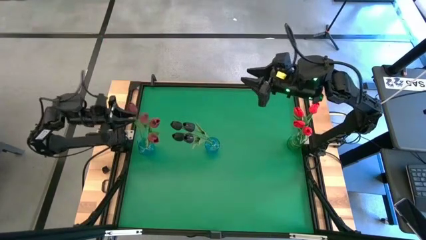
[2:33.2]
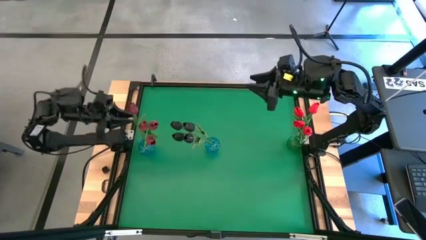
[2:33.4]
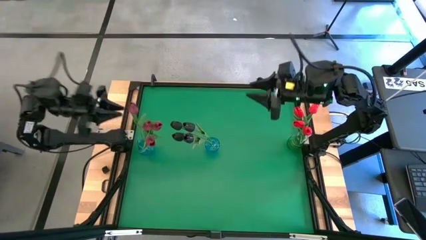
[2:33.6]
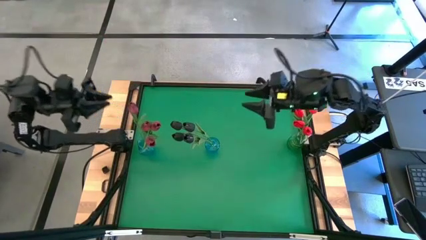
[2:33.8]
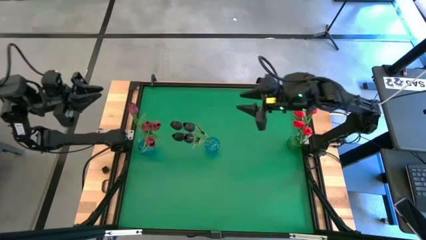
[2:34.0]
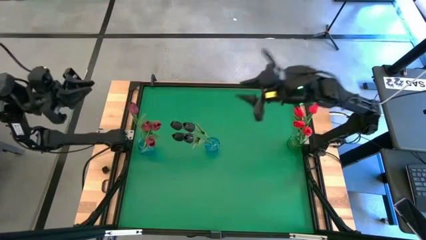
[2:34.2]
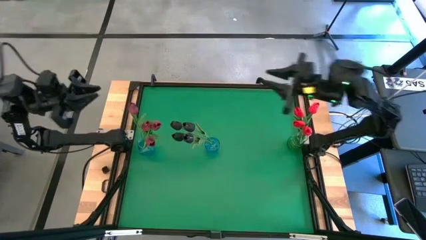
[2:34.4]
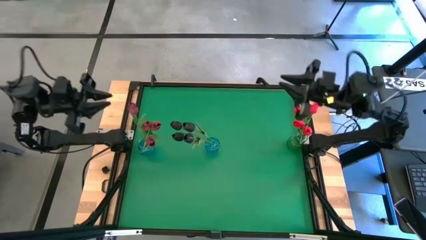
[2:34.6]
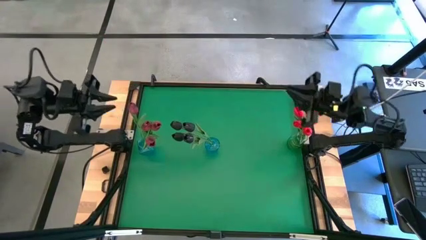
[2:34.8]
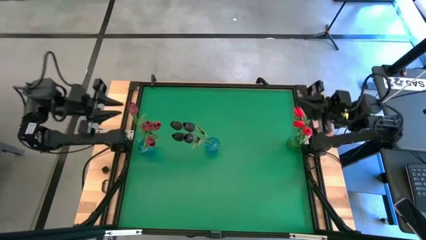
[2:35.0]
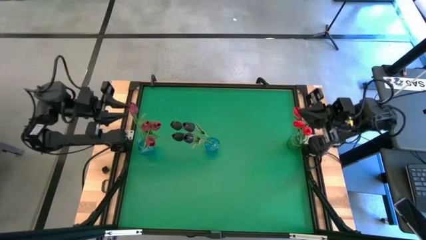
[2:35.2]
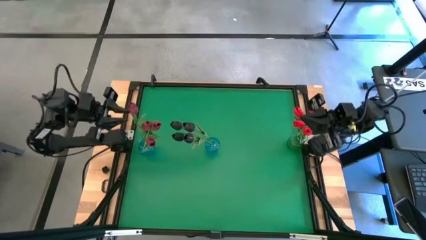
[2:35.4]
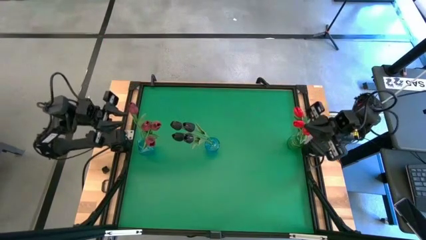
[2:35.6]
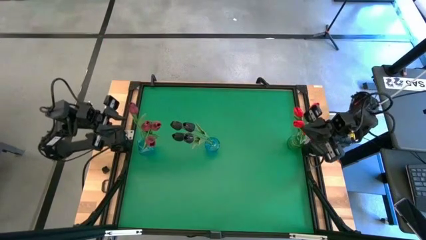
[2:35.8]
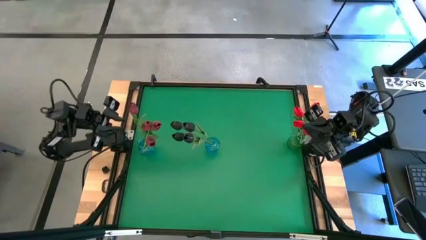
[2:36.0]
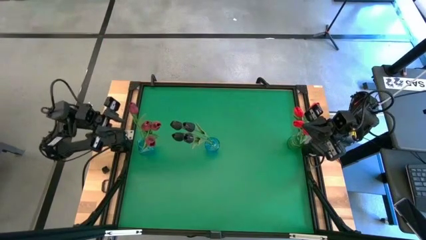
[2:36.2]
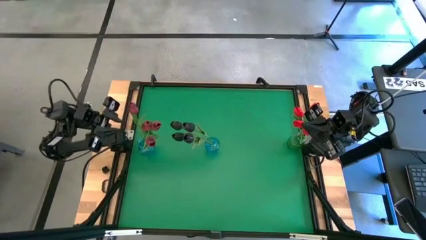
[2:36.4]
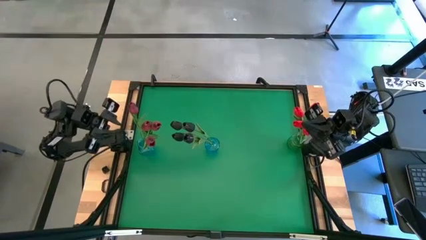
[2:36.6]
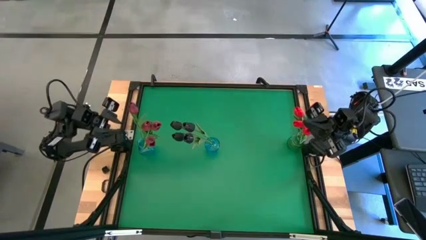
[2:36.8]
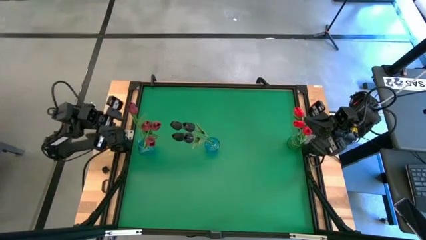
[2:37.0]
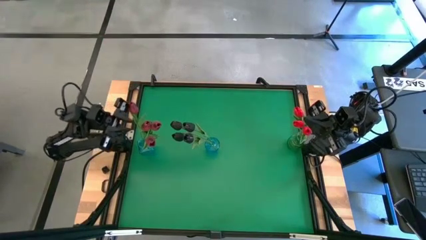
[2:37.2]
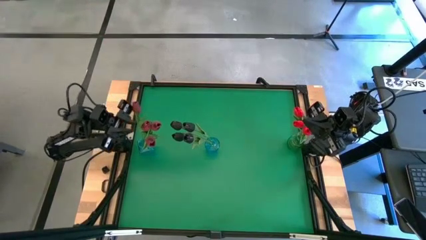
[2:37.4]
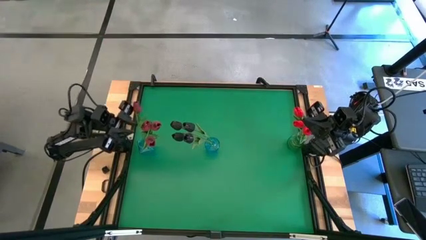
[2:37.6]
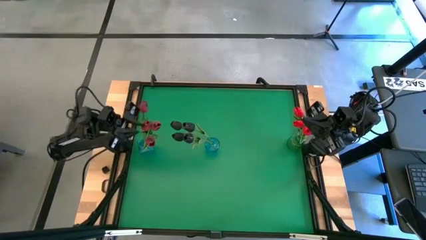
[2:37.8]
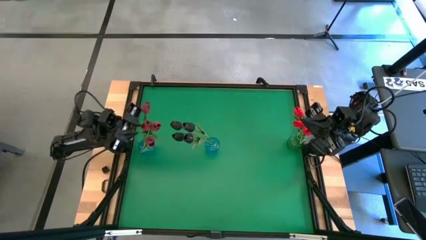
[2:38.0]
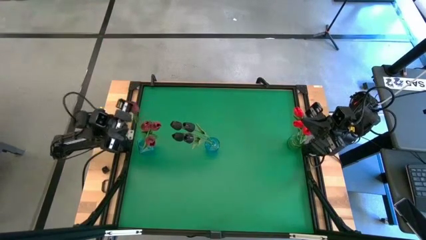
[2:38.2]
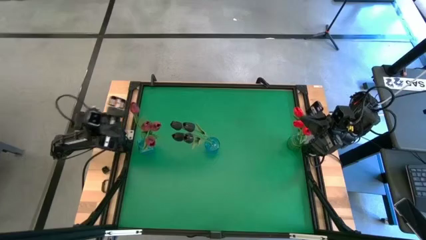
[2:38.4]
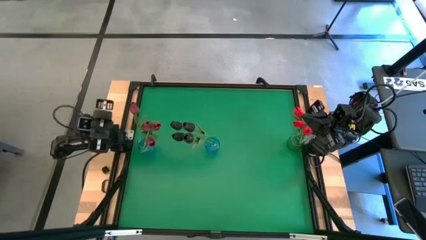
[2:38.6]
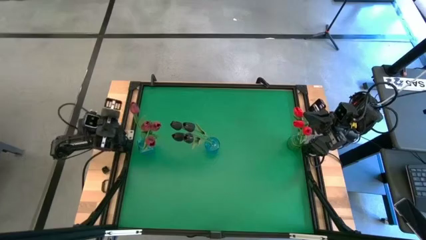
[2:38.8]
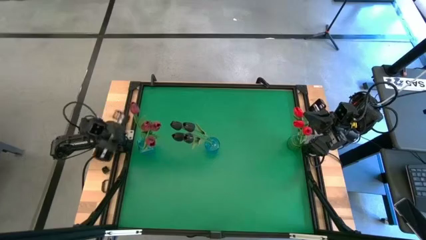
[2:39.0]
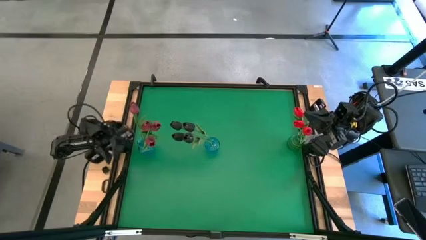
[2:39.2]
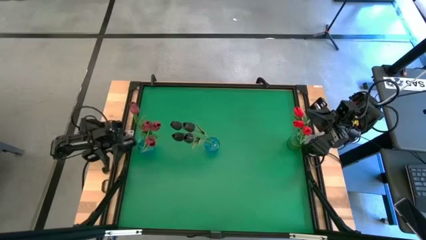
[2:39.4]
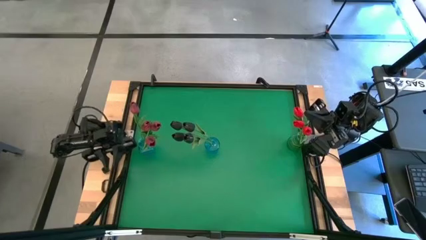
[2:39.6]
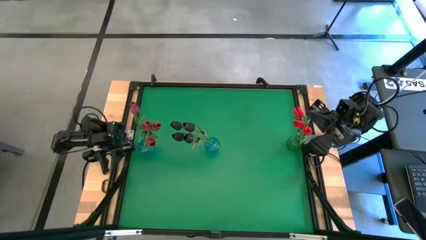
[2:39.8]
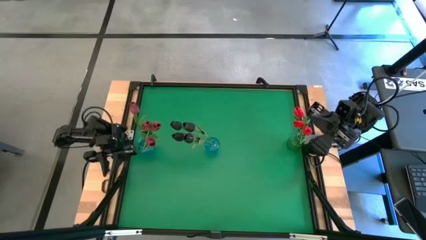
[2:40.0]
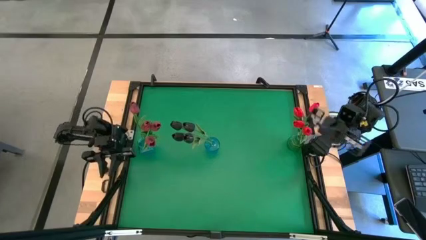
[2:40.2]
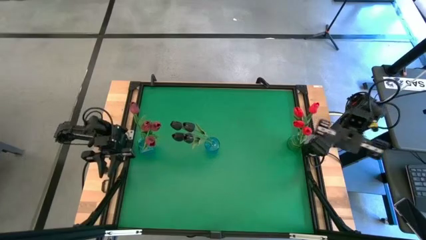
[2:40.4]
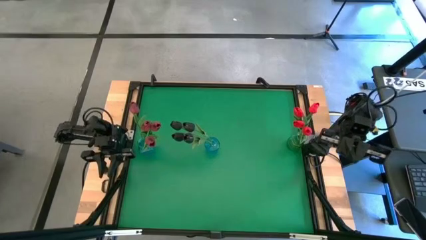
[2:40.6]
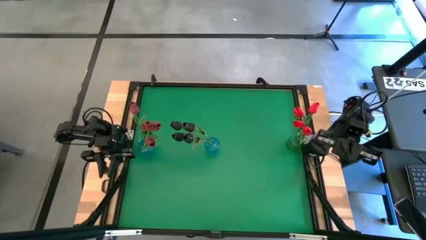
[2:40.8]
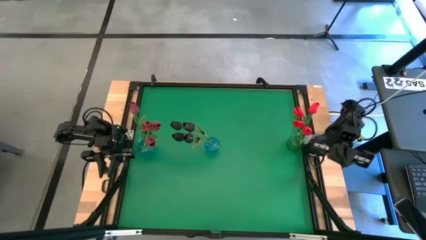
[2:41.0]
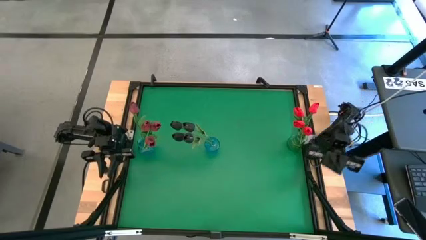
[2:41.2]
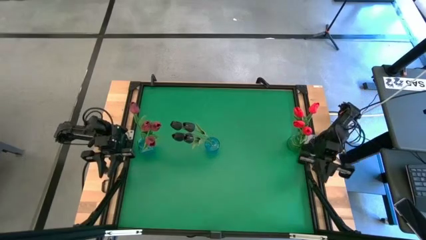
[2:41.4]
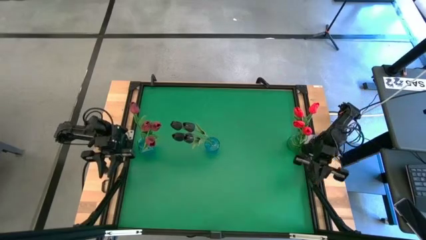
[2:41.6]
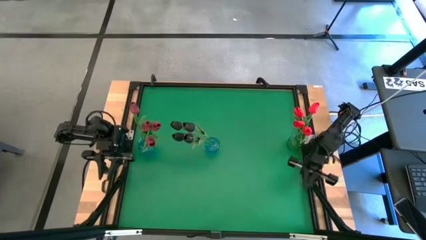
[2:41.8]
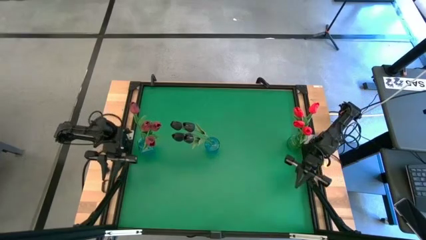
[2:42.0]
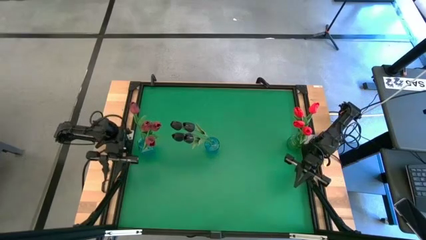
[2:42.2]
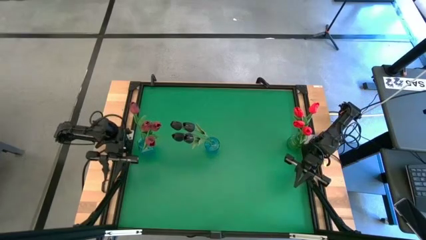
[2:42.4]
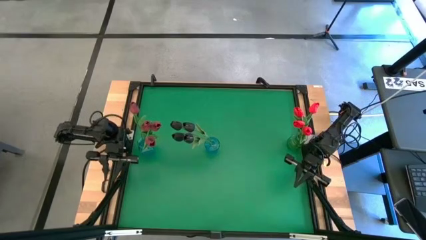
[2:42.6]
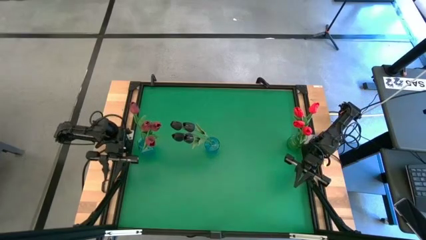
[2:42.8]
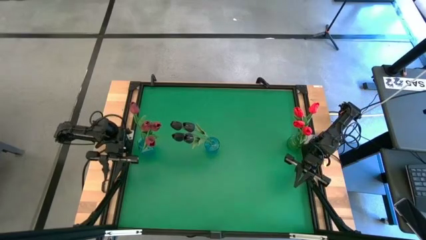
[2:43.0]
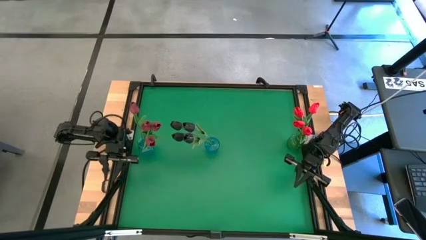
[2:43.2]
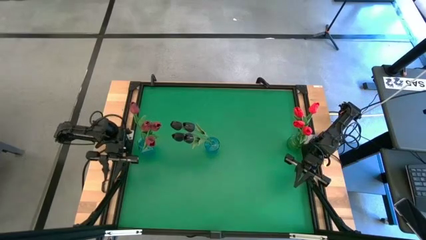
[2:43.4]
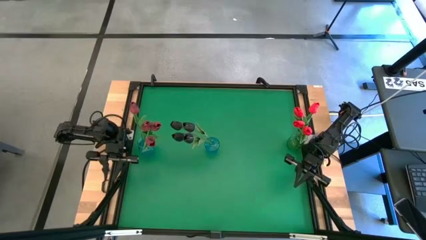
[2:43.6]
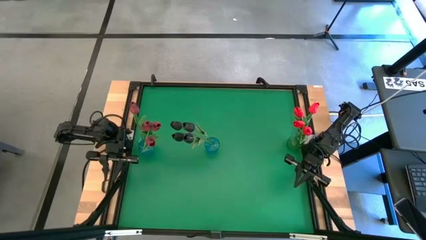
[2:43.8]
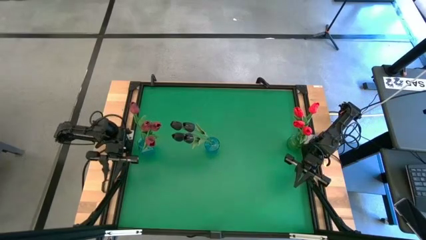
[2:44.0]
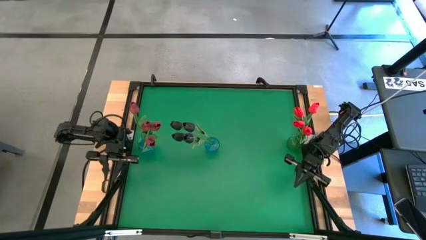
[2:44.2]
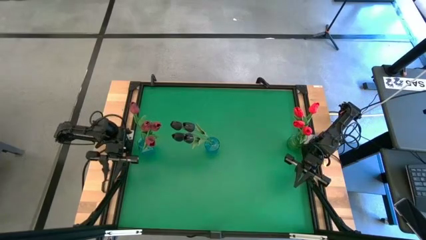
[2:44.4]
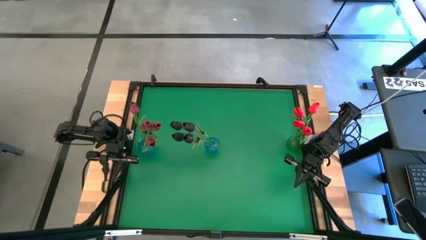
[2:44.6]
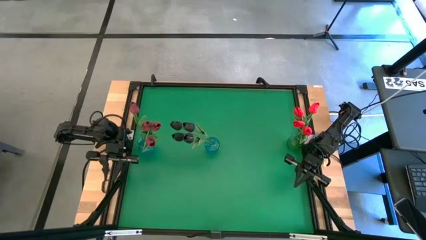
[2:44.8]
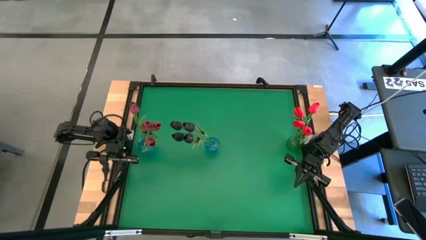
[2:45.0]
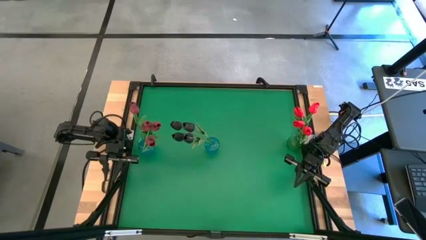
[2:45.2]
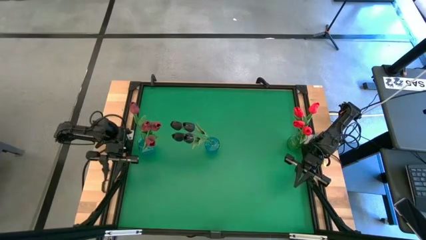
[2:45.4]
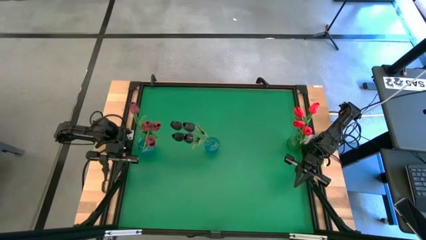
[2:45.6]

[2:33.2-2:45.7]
Task: Sort flowers into vase by color
Return to Home Position

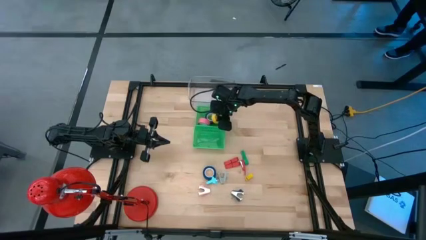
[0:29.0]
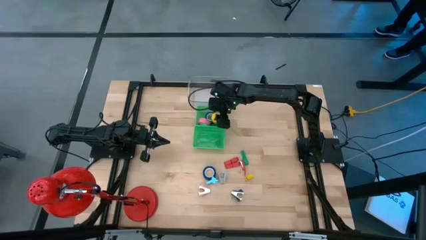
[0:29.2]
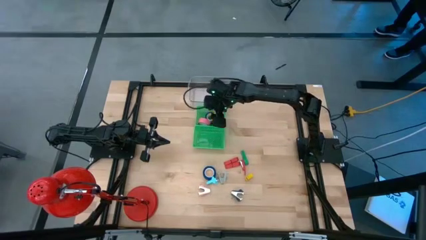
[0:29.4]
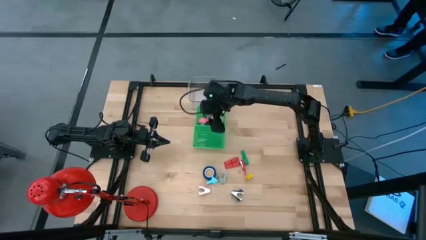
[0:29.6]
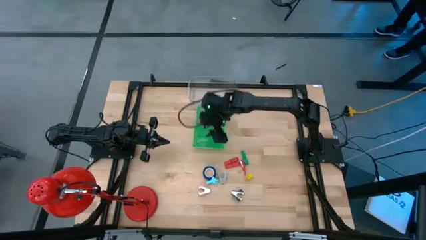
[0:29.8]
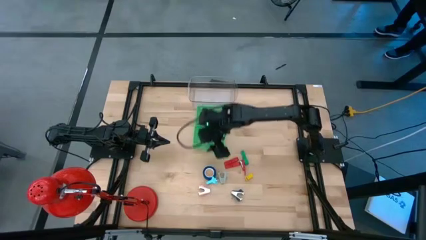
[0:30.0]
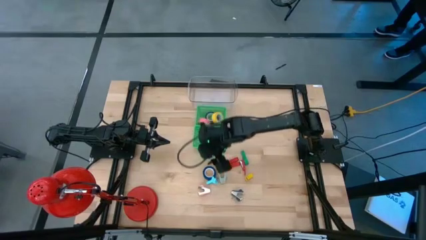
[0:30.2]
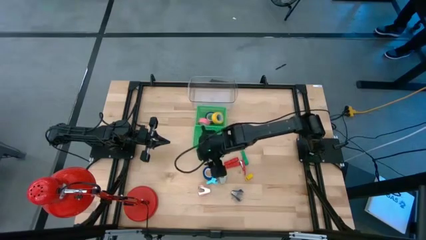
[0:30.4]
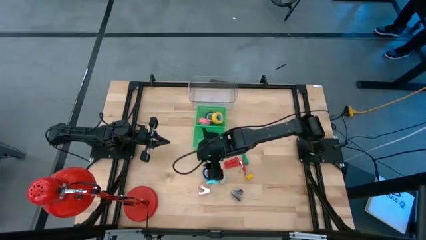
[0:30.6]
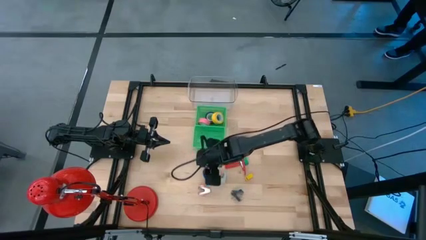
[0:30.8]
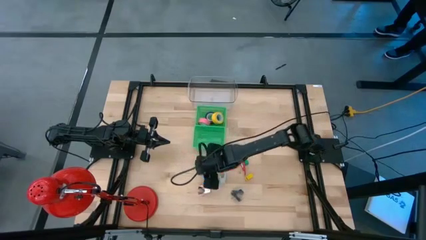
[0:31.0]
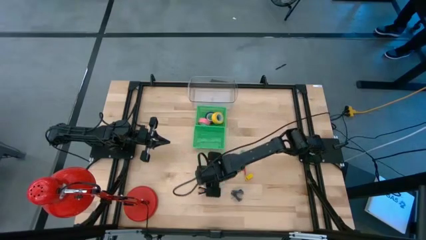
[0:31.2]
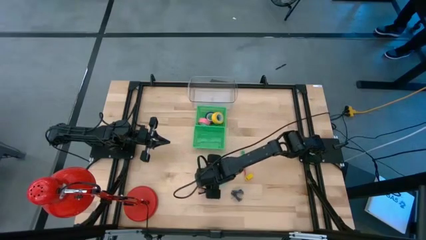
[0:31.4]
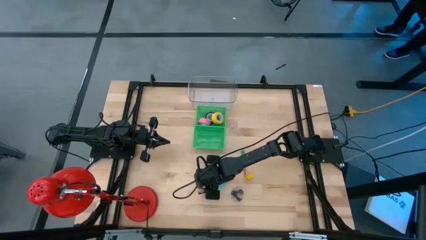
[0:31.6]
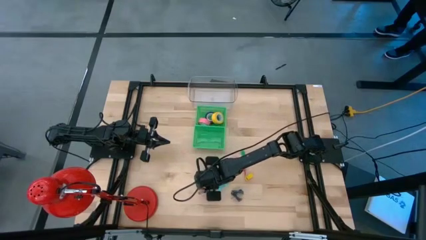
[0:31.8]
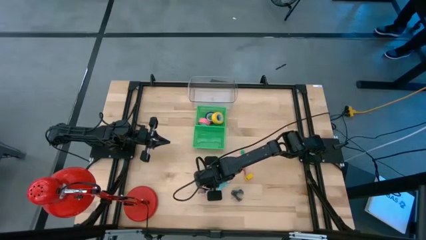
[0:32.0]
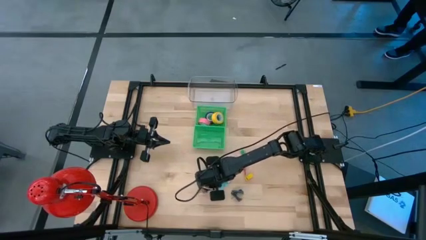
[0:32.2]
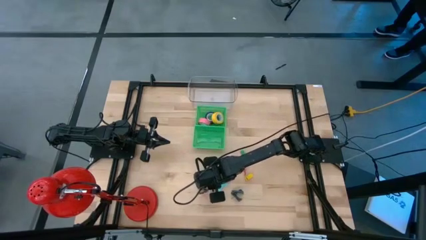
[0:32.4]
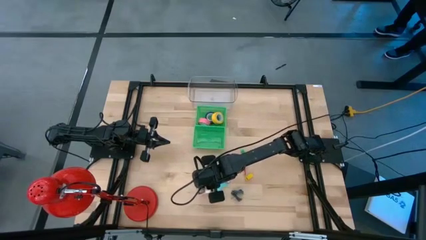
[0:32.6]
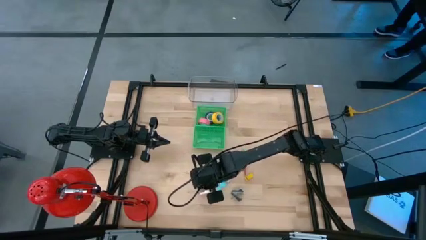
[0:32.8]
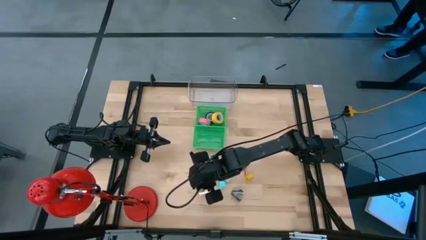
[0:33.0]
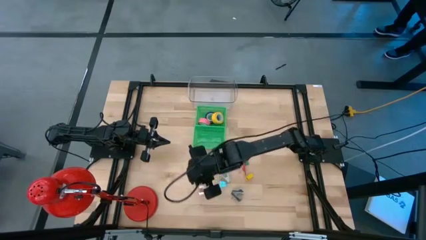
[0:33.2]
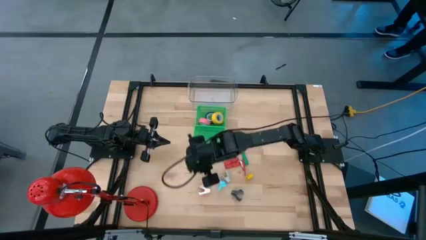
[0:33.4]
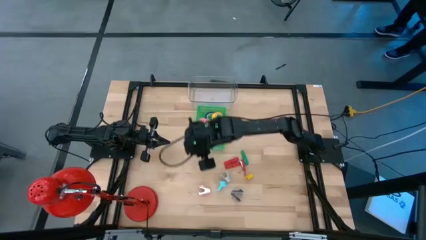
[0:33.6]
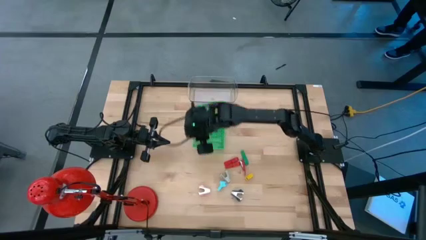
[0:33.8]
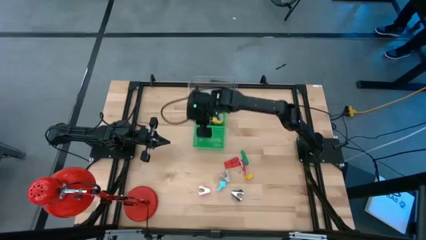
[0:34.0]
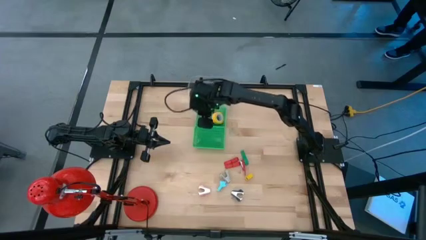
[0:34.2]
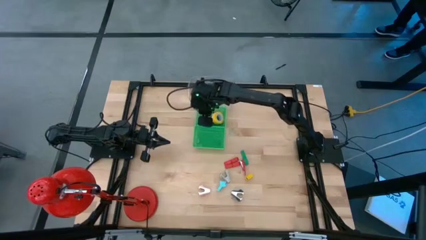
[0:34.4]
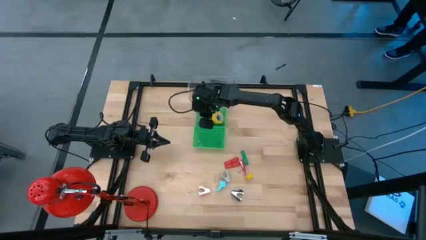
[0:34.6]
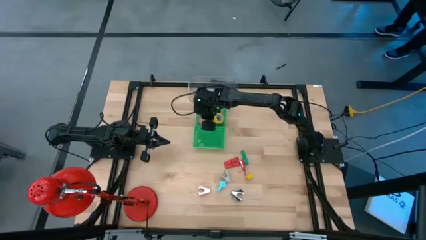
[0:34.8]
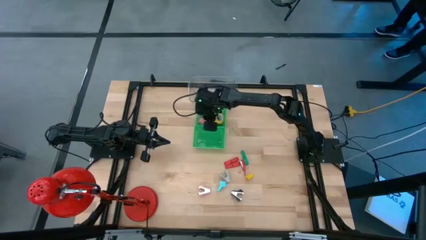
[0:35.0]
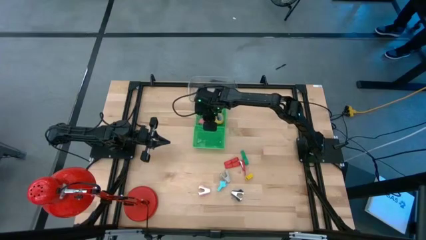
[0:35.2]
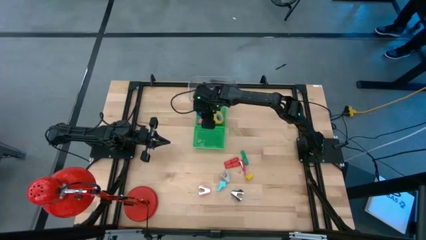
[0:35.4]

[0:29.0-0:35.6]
Task: Pick and place Stapler, Stapler remover, tape
Put the blue tape into the top green bin
